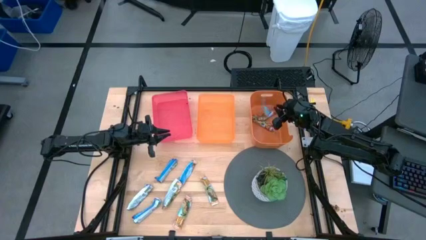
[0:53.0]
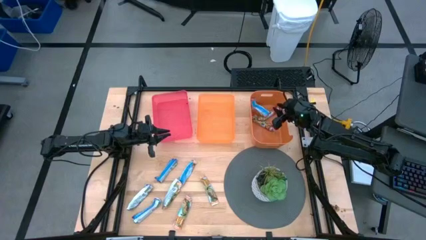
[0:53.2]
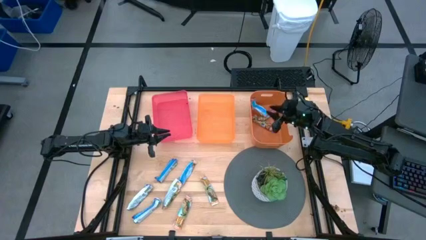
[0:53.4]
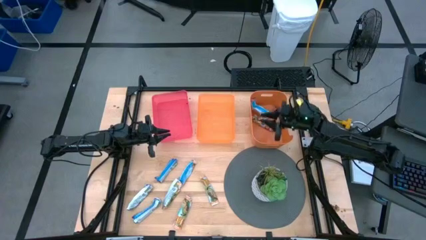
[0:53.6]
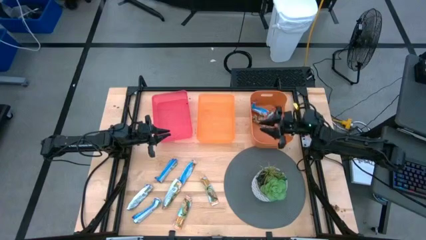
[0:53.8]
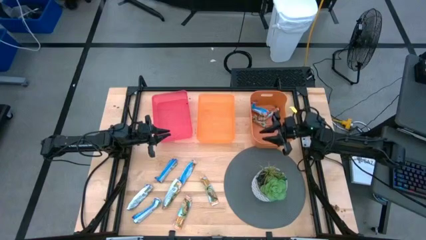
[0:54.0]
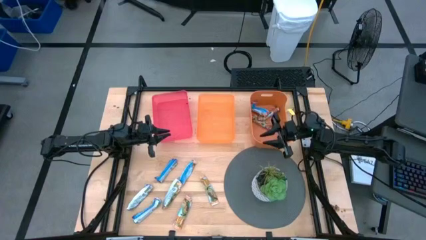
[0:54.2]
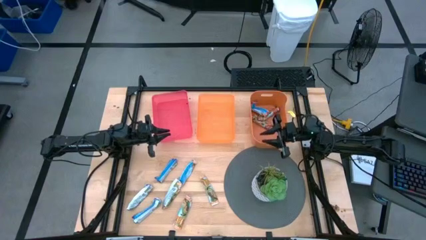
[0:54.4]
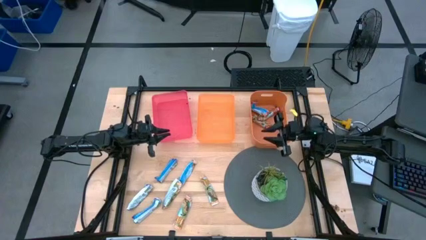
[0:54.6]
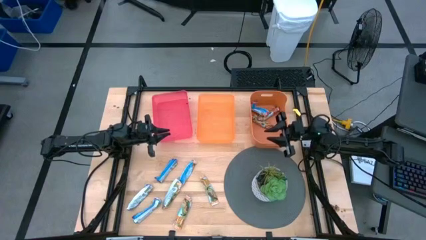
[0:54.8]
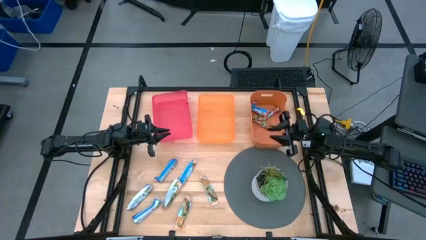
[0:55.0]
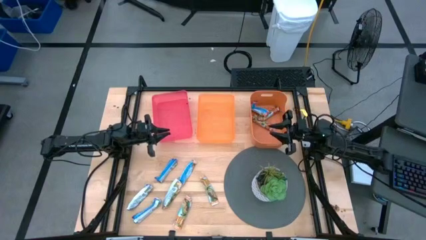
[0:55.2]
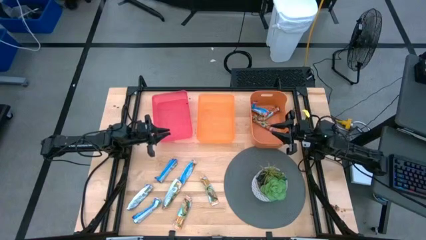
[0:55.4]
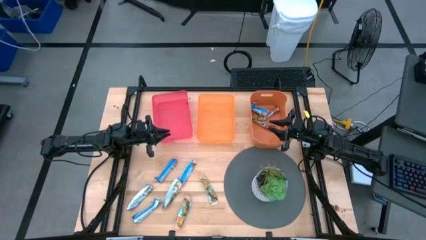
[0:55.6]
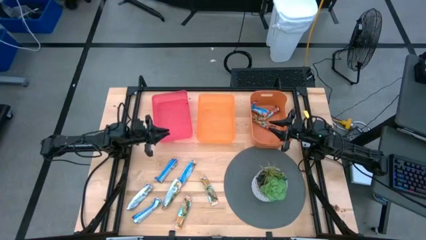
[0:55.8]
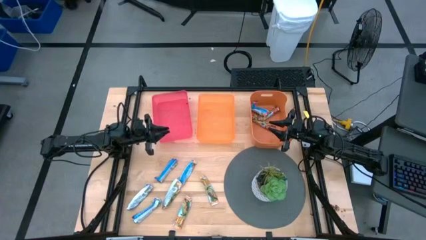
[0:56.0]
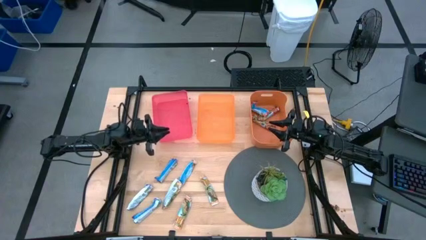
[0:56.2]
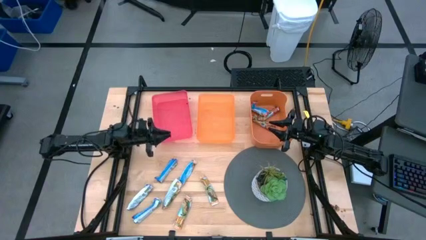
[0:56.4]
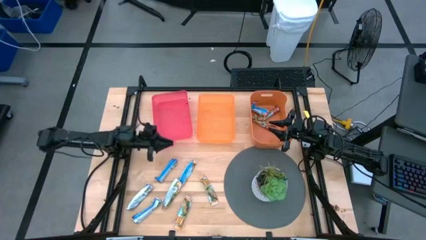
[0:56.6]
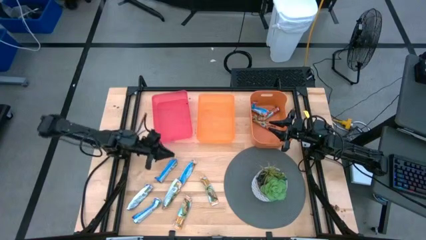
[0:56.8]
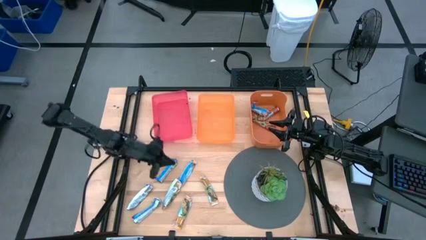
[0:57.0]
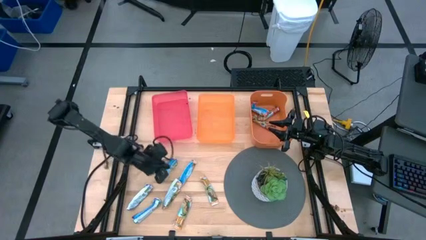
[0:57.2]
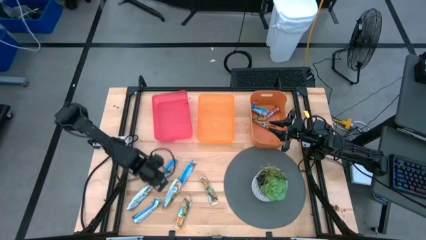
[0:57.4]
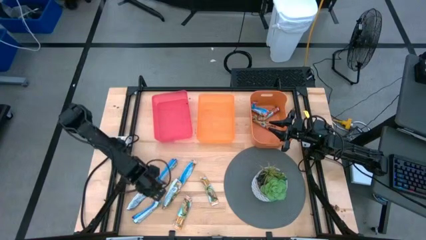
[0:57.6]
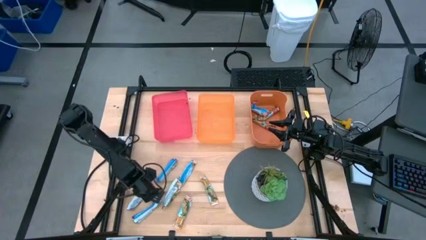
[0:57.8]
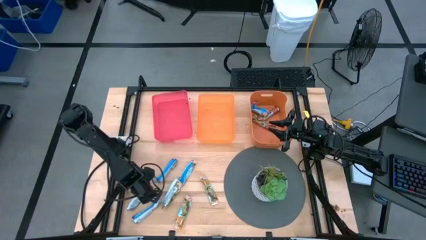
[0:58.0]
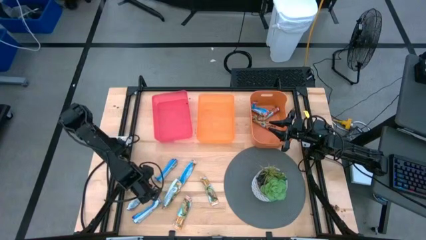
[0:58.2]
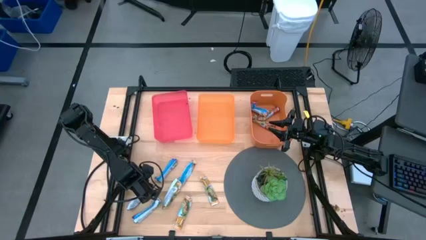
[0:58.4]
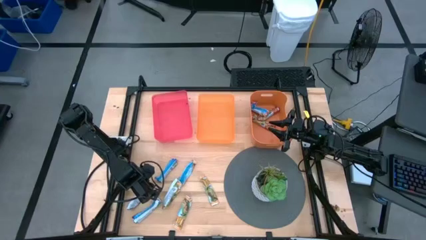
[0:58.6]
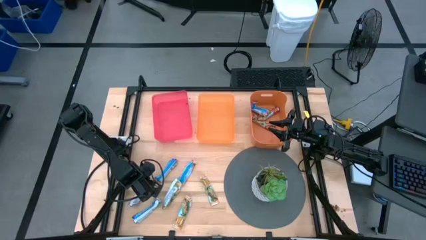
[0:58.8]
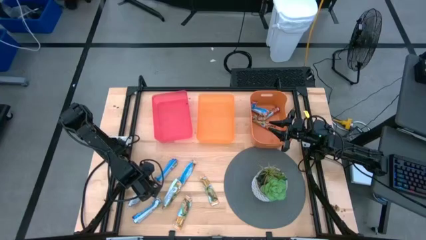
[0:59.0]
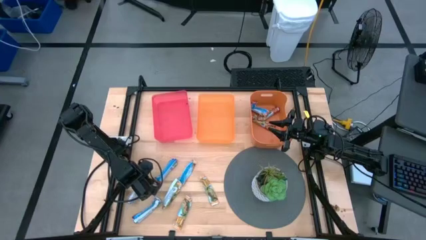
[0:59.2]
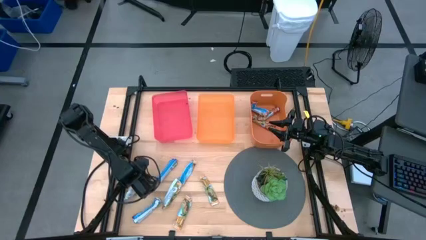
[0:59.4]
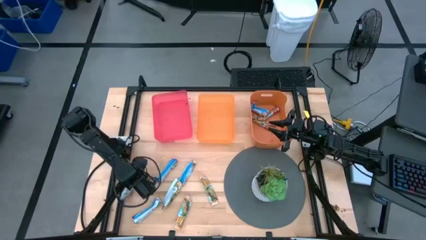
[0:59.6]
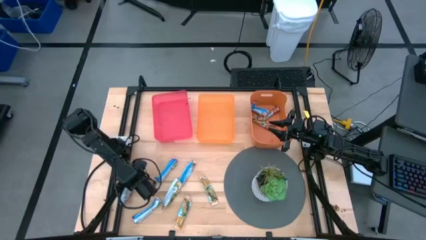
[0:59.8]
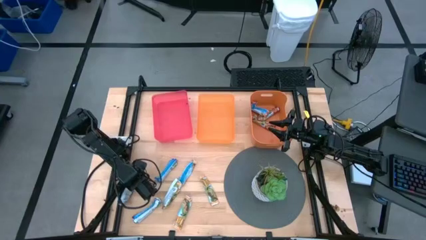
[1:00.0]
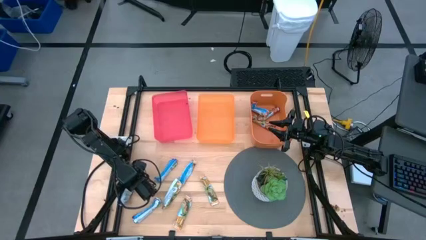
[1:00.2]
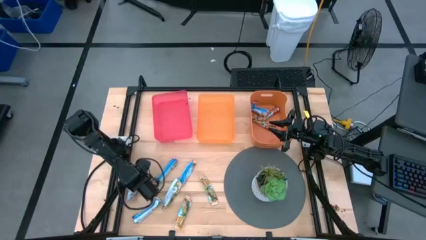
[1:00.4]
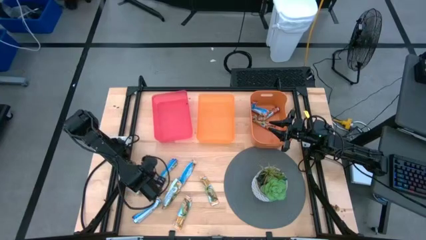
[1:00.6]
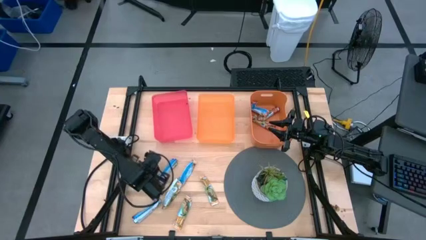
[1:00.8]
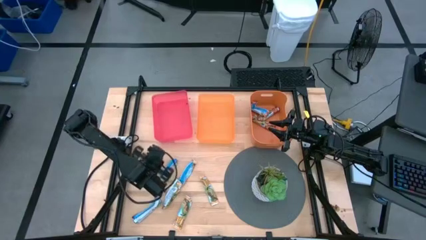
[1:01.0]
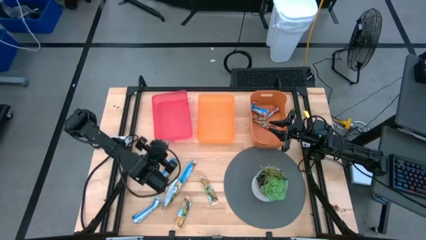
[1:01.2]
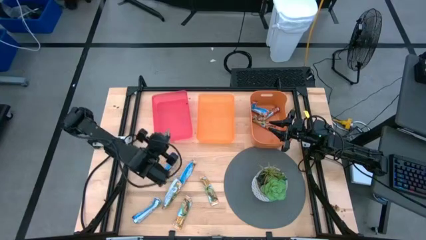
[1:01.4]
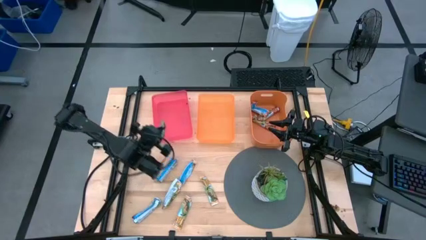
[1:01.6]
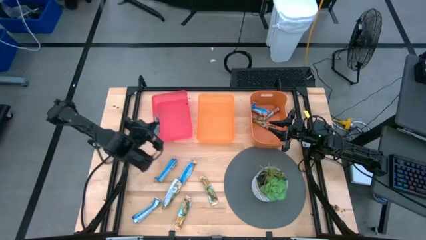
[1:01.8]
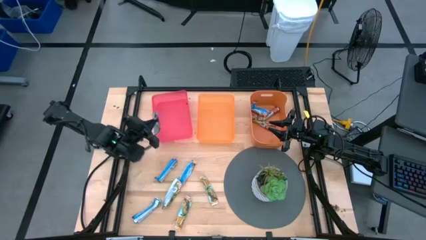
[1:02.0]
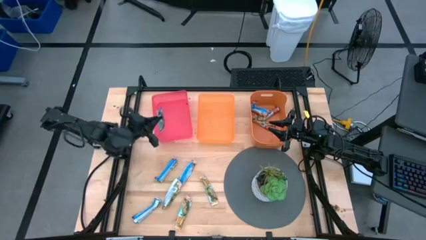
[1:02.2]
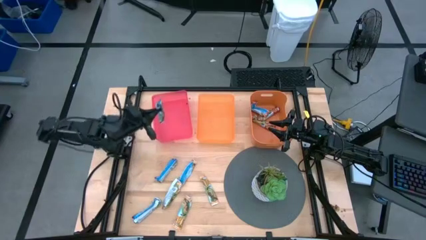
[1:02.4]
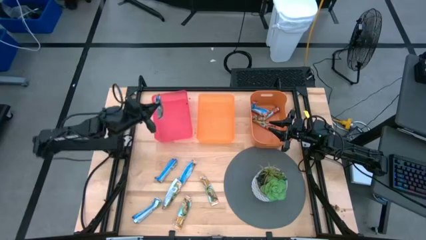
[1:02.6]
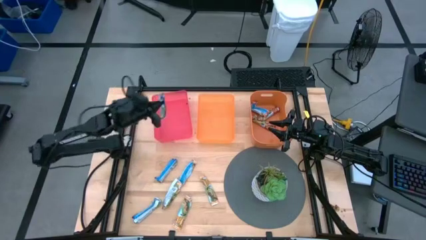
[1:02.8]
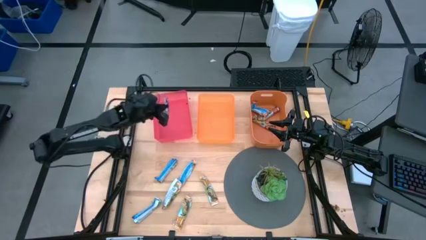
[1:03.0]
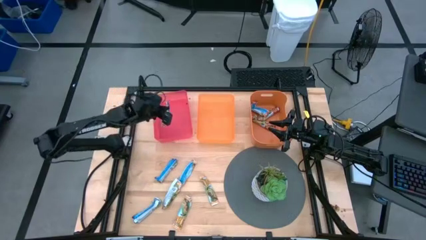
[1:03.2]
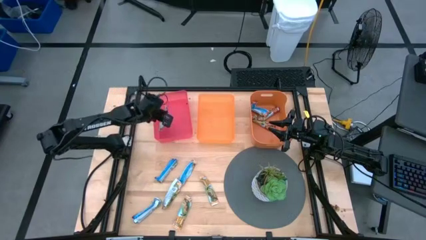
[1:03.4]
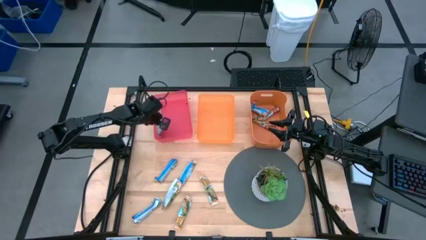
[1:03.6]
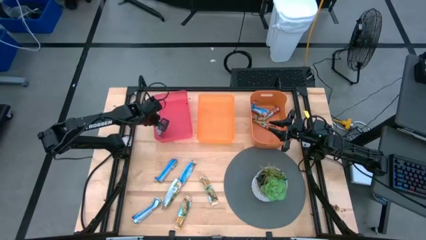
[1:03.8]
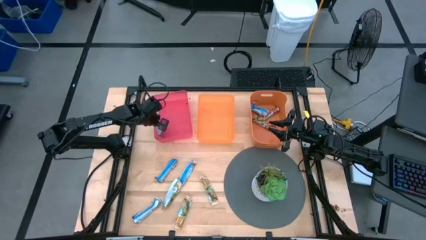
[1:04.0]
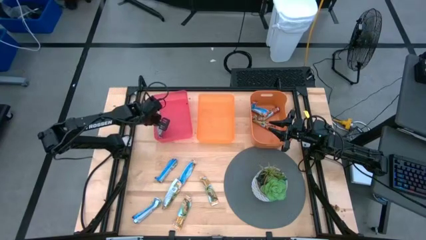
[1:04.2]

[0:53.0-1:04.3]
Task: Pick and place Granola Bars by type
Put the middle blue granola bar into the pink bin

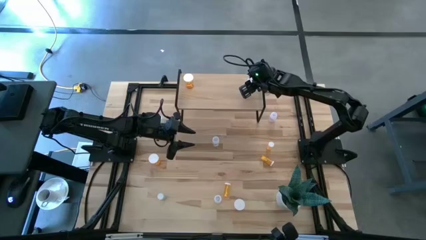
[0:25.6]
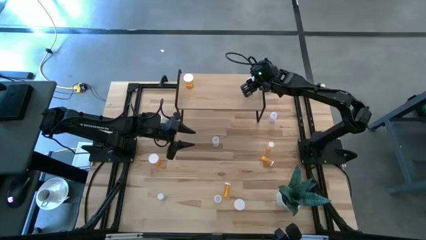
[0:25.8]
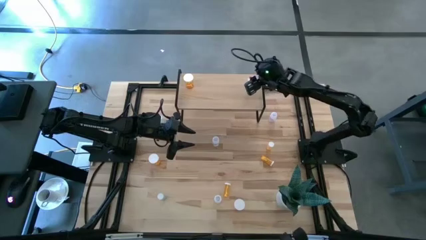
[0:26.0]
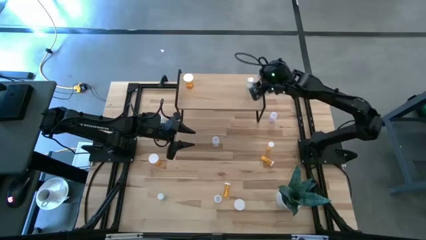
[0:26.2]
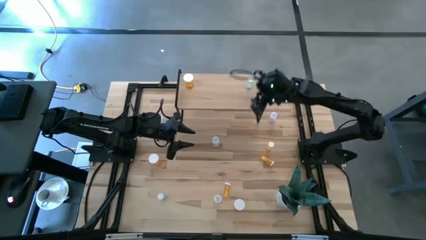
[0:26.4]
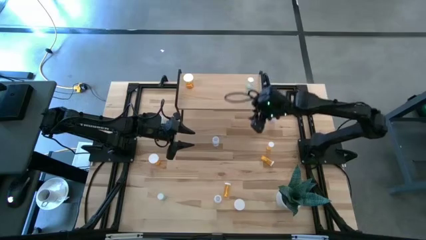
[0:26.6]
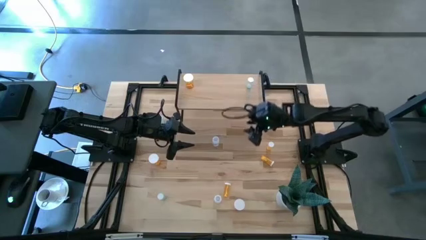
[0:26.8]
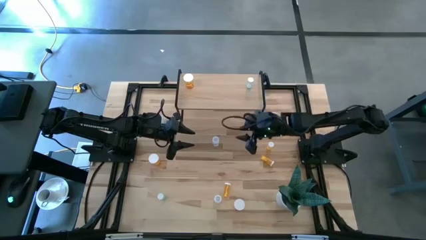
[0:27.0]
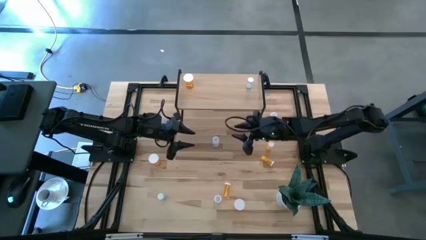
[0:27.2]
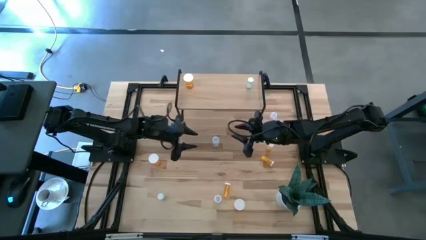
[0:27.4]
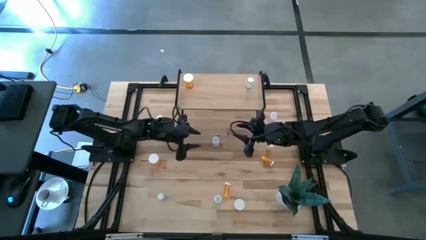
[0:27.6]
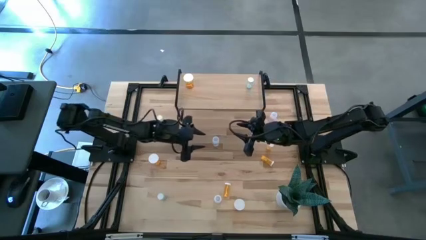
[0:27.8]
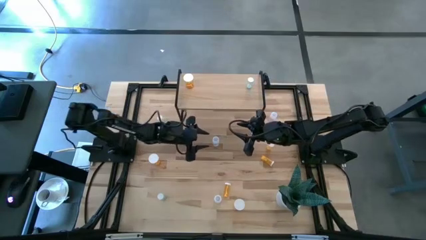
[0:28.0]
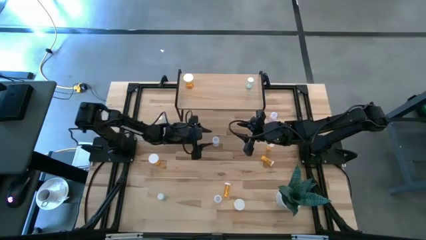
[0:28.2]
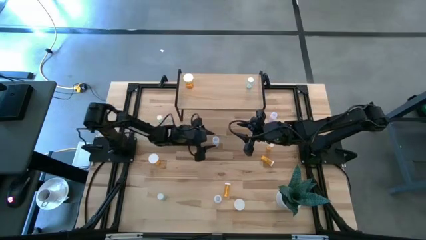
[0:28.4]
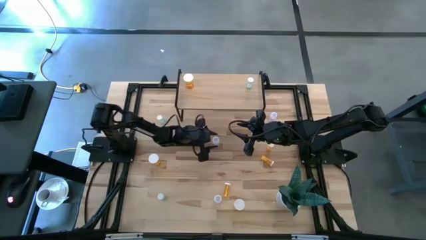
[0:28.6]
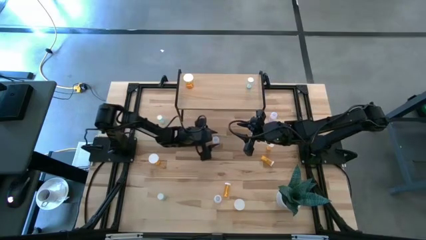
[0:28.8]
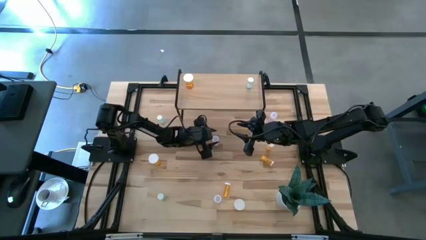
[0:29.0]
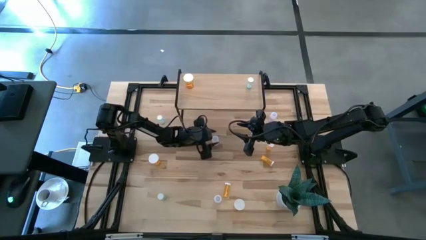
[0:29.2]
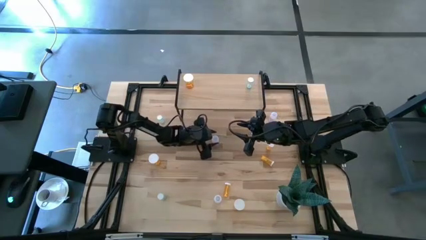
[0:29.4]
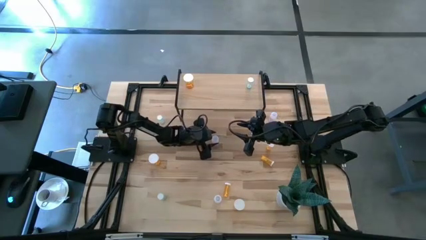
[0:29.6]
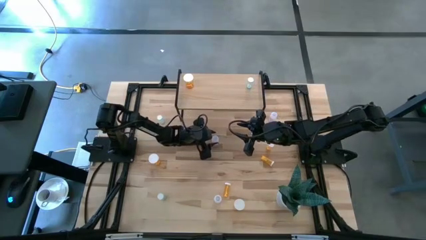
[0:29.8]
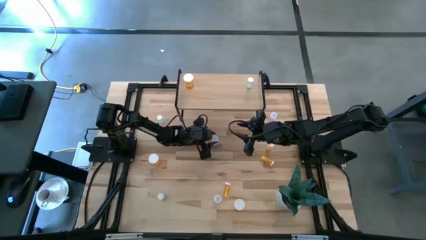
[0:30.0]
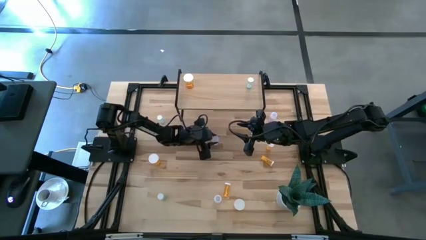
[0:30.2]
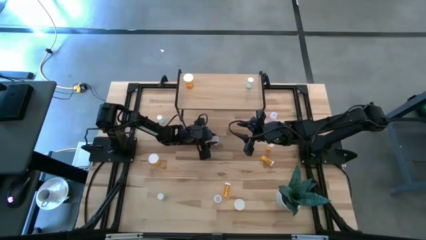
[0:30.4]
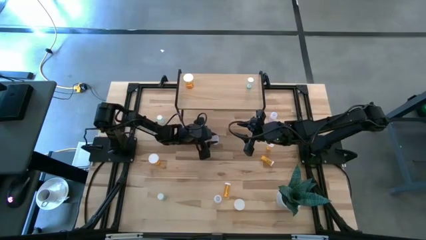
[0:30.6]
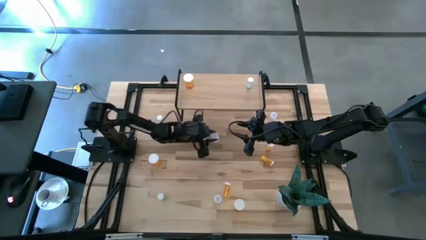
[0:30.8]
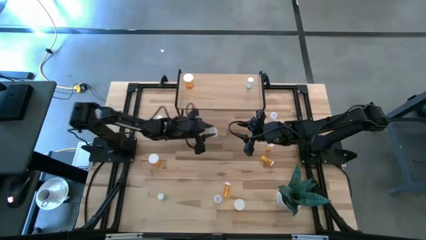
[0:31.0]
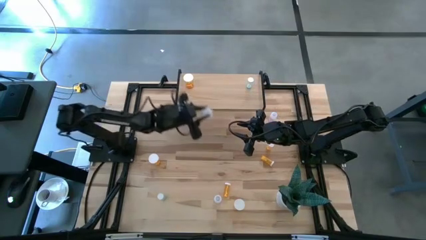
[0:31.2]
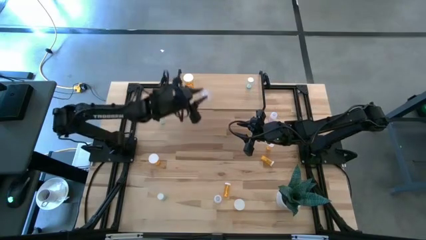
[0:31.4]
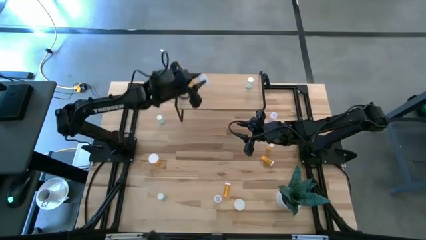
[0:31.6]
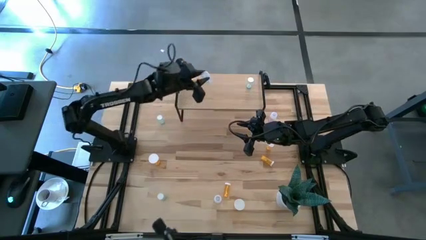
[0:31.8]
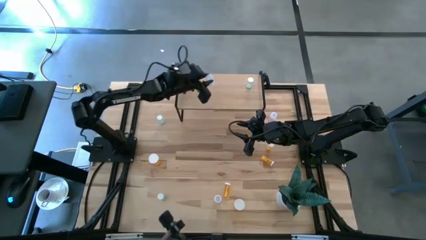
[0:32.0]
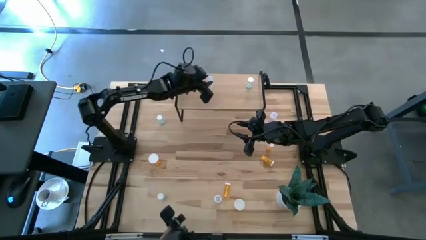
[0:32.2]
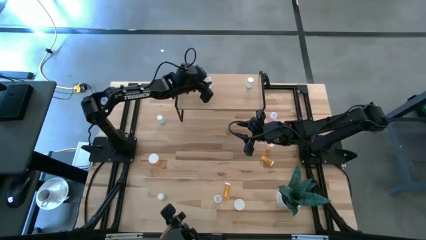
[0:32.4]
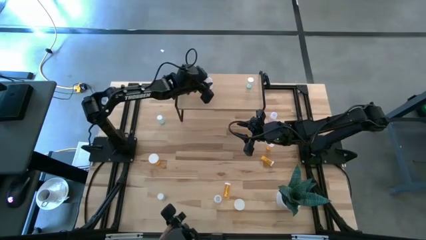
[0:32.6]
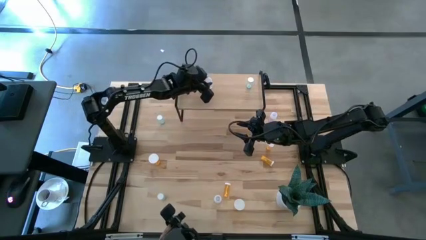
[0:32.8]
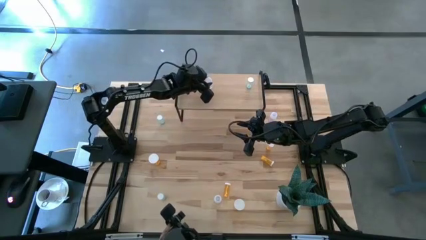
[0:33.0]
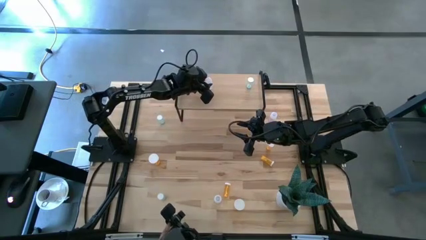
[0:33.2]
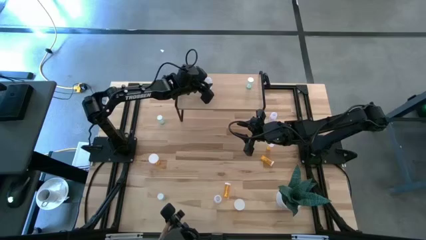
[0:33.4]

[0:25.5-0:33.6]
Task: Pick and place medicine bottles onto shelf by color
Put the center transparent pill bottle on the shelf
